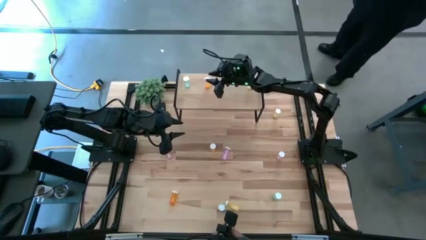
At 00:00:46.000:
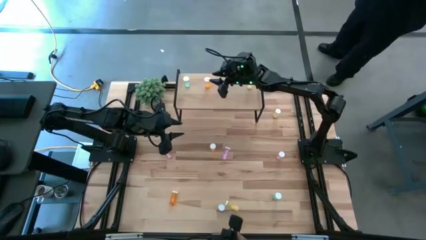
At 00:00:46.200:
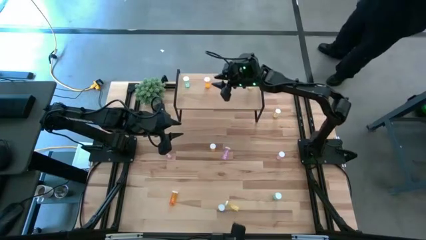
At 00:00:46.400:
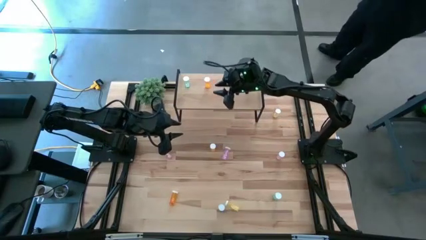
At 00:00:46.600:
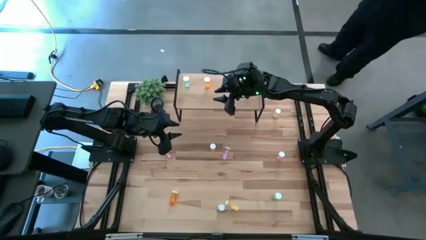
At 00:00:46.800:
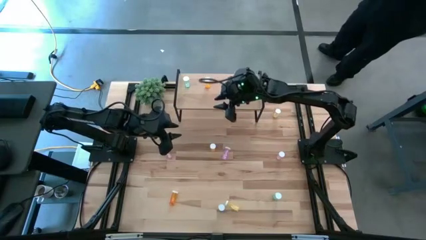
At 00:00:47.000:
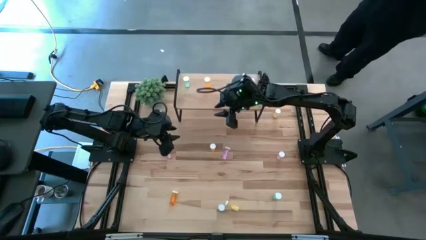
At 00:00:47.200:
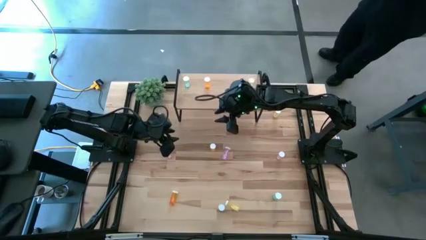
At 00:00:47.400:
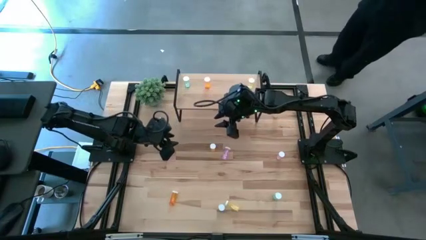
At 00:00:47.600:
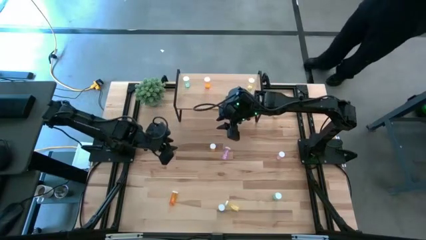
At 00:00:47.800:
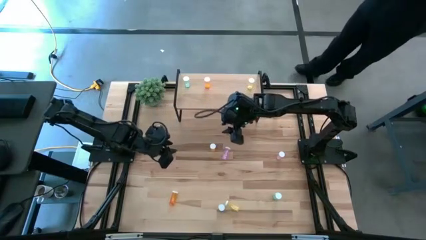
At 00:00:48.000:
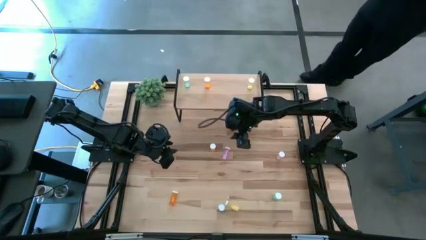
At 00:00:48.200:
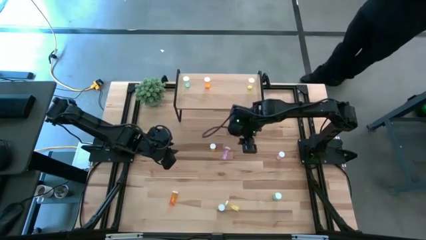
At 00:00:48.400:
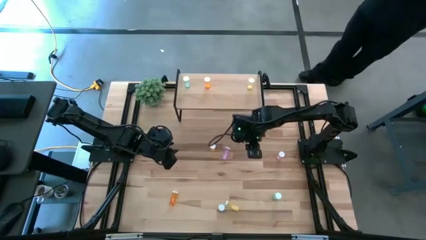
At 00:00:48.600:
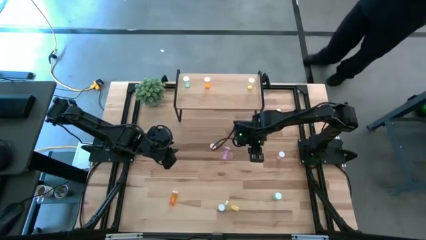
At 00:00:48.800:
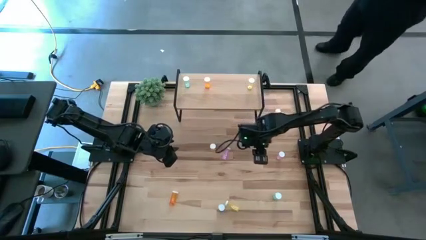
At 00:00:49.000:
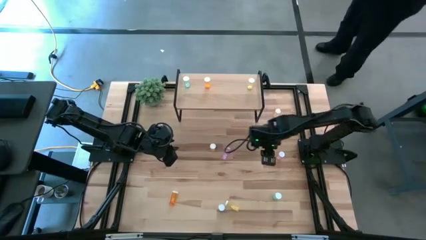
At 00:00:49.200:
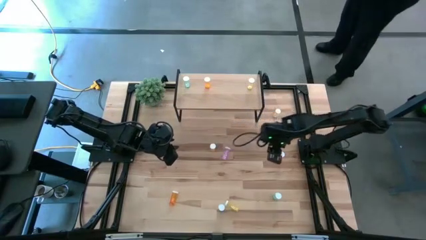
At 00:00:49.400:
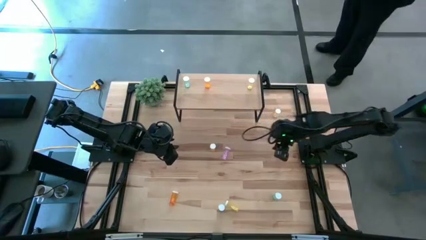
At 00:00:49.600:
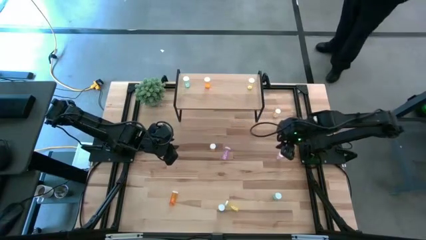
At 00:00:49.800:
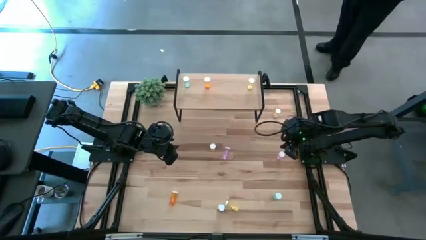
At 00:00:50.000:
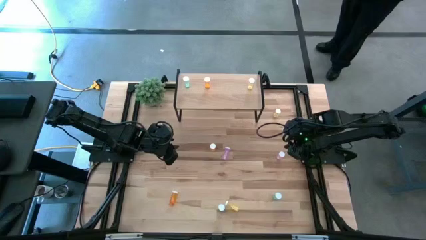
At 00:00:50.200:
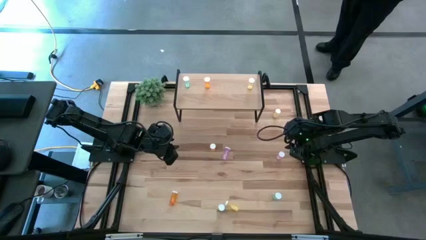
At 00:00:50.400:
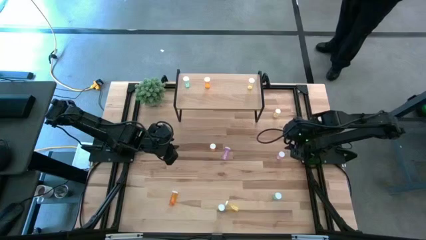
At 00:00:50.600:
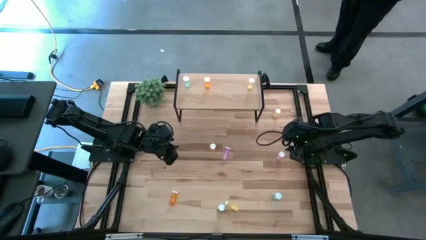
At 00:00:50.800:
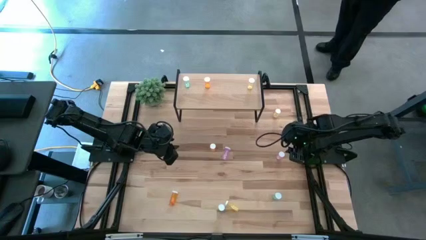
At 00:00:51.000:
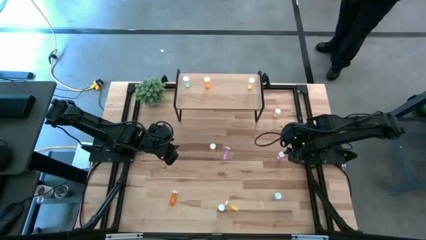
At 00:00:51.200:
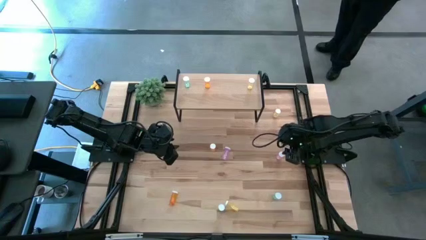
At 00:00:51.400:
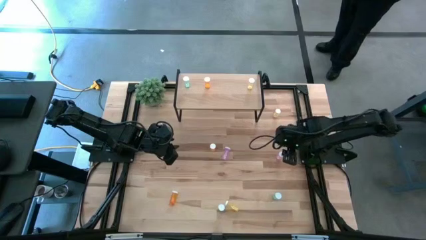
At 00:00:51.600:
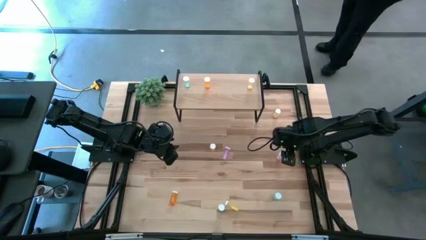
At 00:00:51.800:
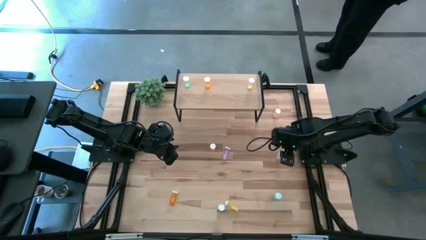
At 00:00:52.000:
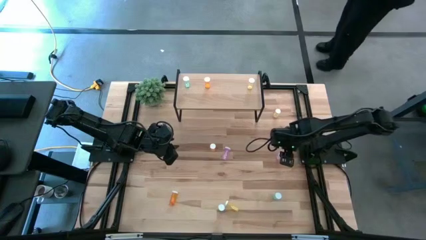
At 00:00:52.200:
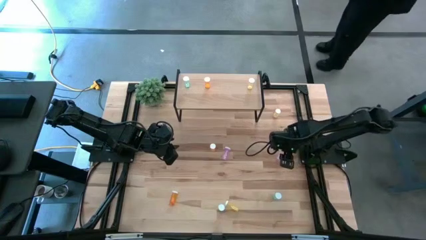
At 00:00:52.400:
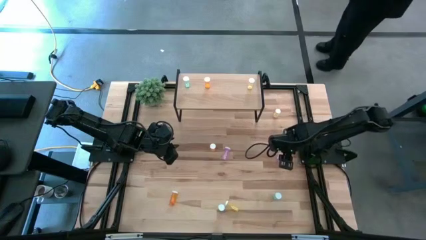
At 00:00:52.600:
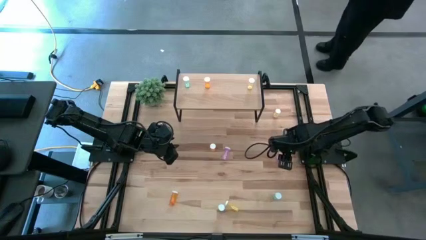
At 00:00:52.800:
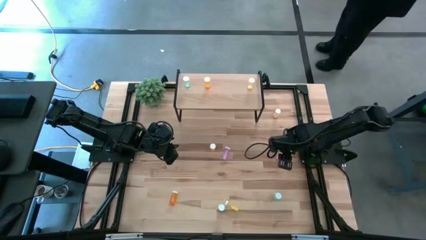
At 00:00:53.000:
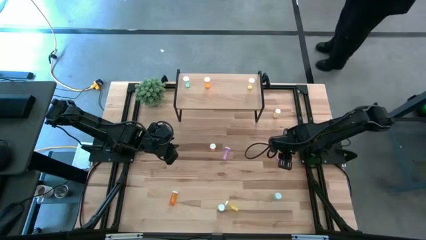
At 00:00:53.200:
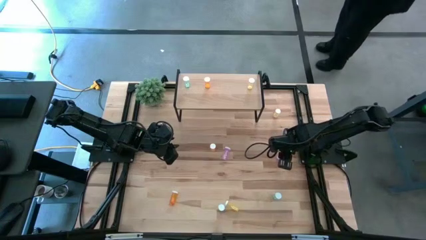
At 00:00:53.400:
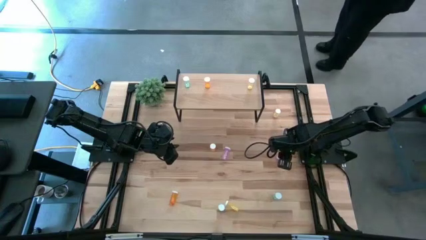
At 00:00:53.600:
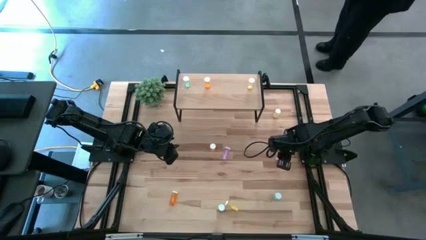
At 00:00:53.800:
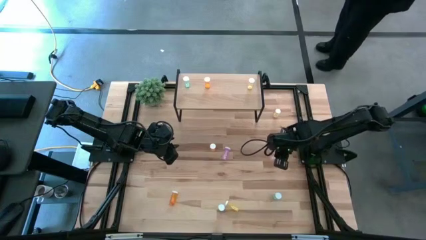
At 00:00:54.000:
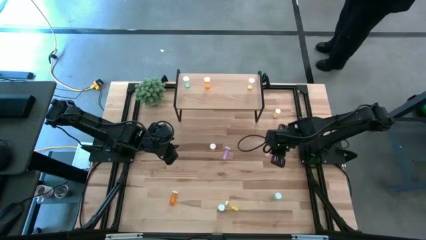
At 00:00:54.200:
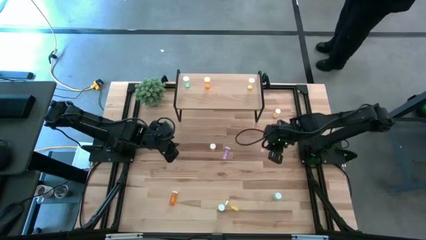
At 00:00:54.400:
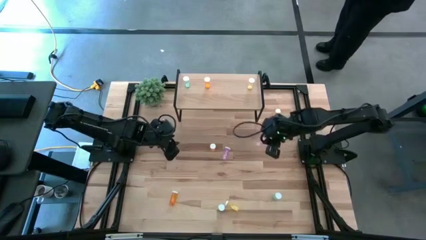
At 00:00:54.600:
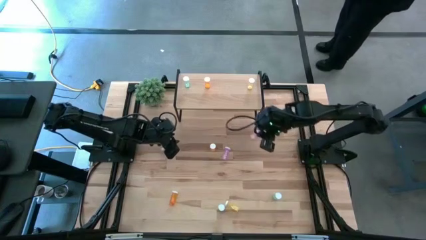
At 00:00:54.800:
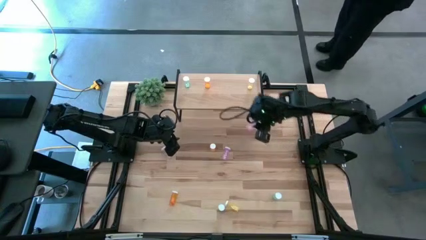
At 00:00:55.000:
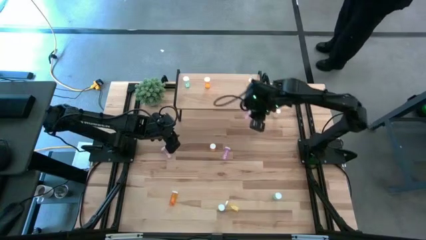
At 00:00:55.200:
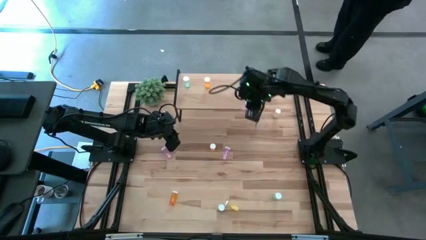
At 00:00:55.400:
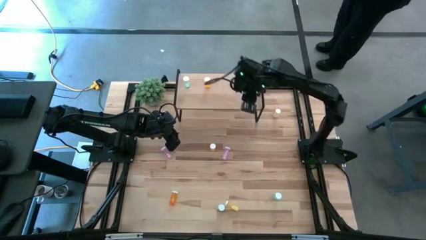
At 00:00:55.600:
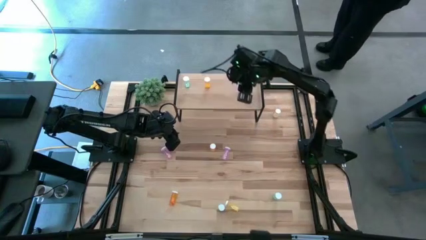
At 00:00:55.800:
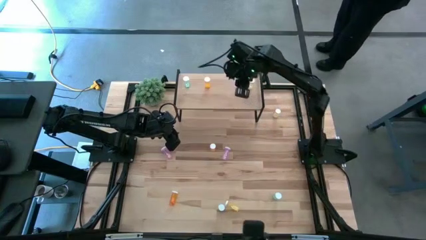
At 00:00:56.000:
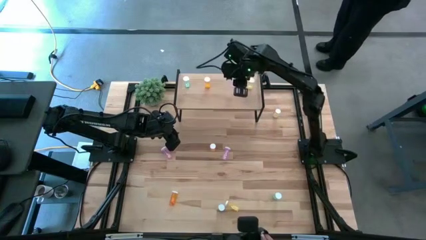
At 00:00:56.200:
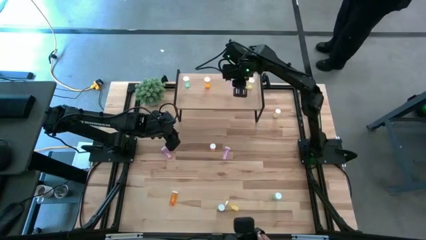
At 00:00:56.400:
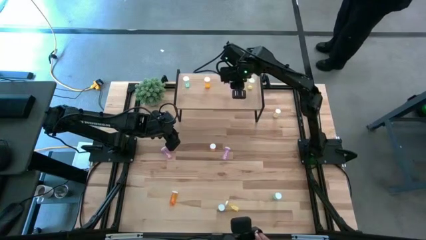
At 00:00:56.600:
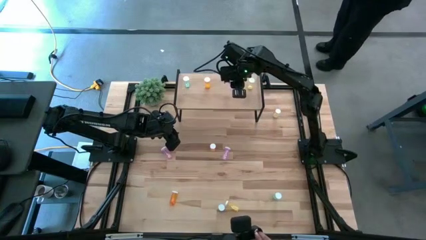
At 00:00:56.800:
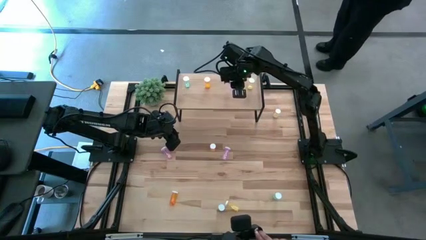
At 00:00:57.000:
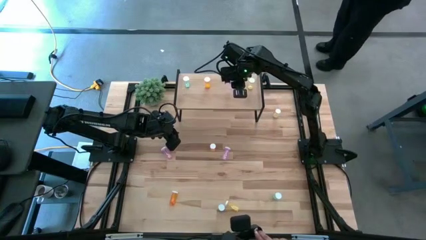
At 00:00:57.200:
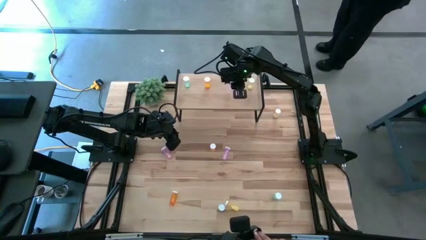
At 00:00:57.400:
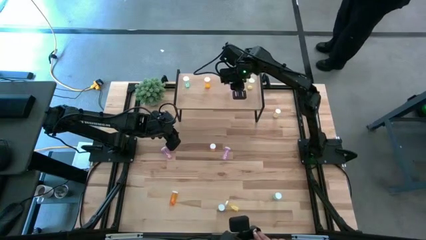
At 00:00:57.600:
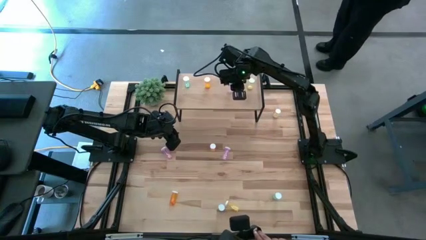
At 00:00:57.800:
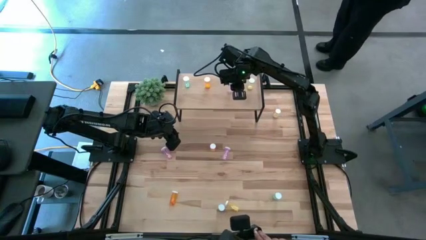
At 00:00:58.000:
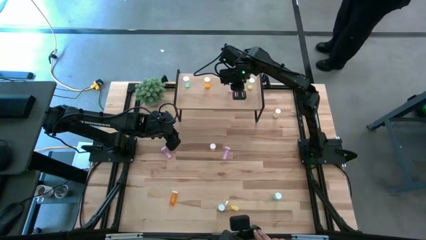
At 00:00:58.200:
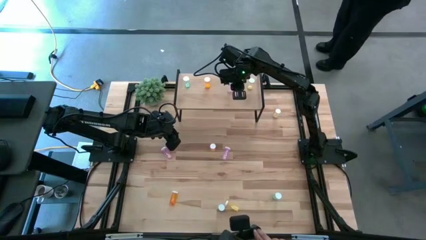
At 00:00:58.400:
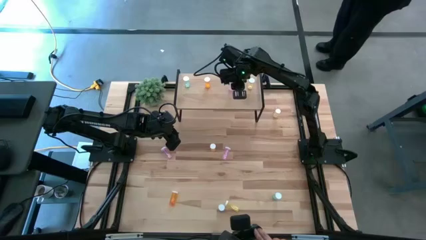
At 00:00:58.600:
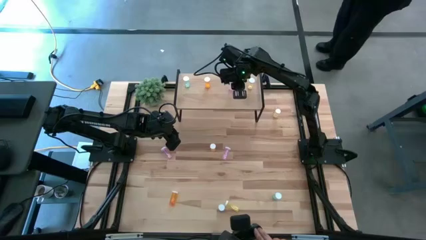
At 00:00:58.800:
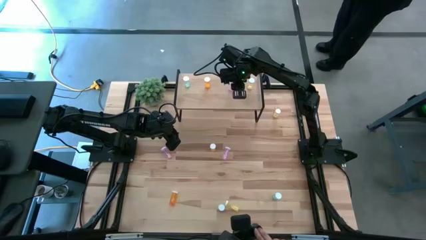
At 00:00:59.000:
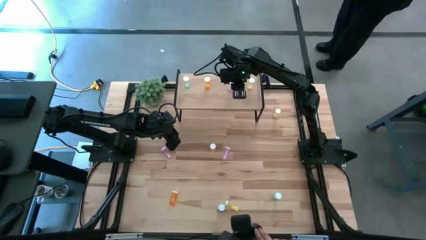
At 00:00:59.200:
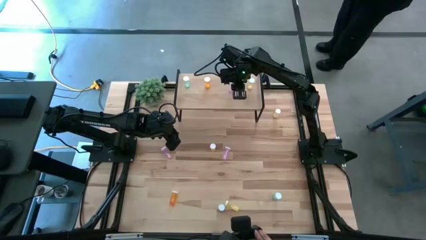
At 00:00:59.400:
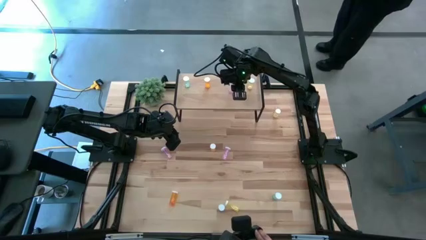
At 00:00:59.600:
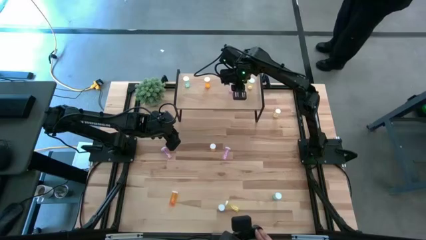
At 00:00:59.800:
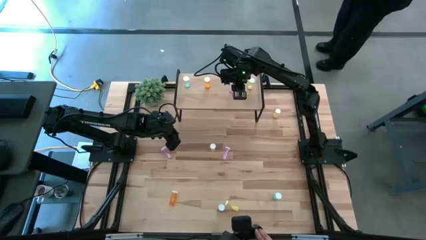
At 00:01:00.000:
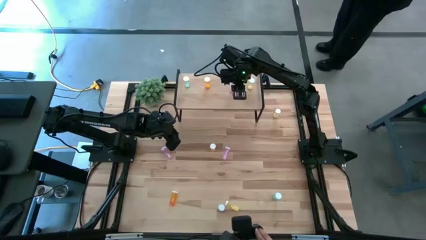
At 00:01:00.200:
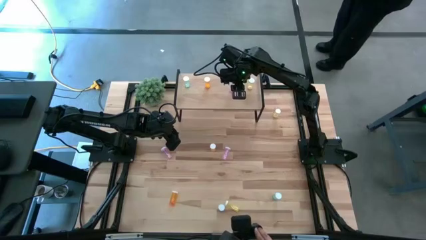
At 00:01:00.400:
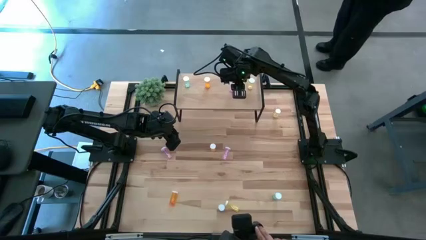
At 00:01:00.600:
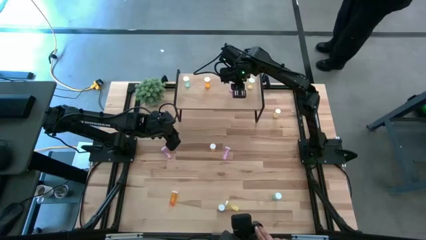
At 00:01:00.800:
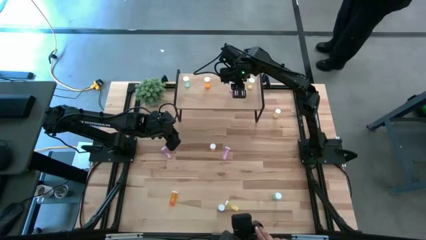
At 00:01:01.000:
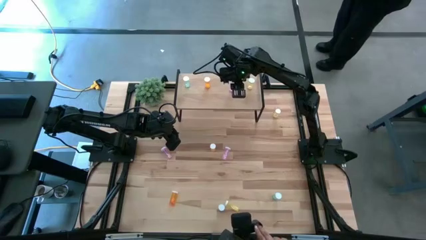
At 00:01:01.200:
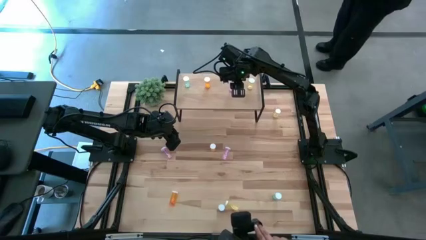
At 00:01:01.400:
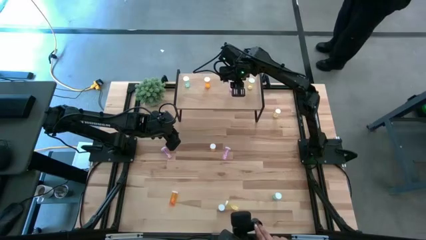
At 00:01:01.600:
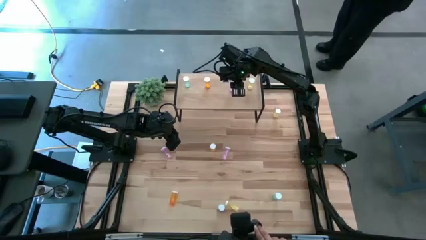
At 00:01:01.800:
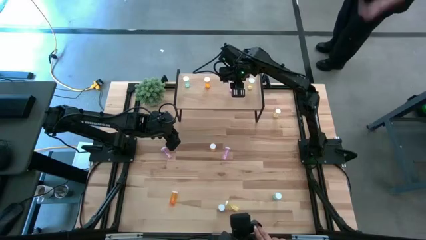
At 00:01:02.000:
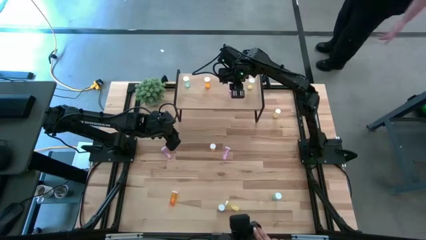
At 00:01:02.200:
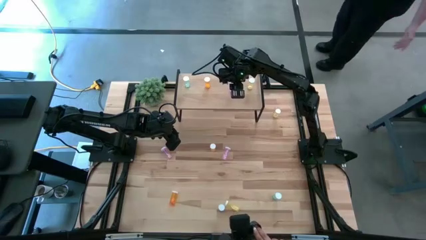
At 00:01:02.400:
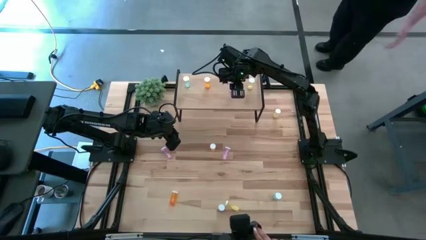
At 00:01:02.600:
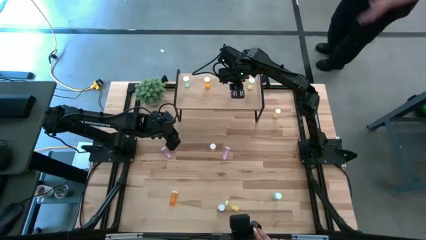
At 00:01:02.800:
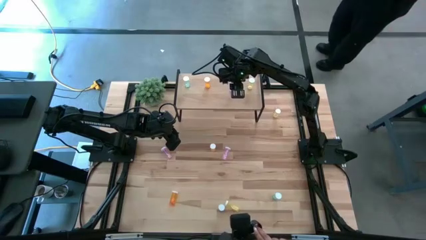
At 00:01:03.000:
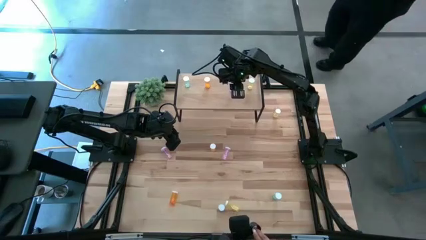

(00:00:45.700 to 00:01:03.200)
Task: Pick and place medicine bottles onto shelf by color
Put the right purple pill bottle on the shelf
